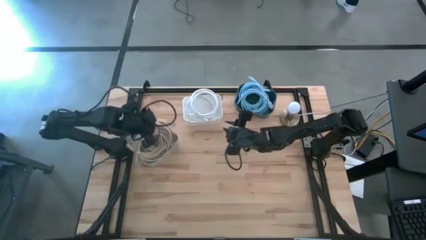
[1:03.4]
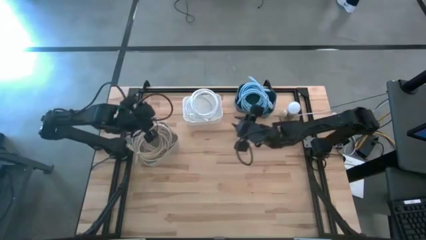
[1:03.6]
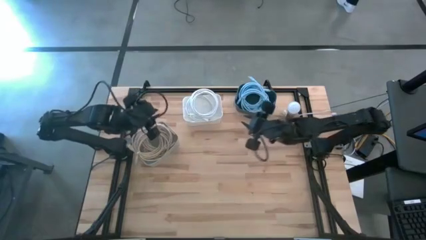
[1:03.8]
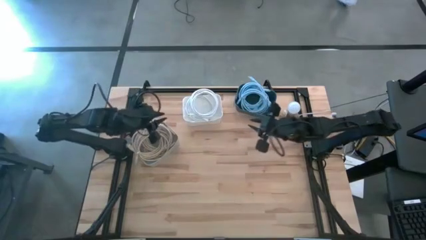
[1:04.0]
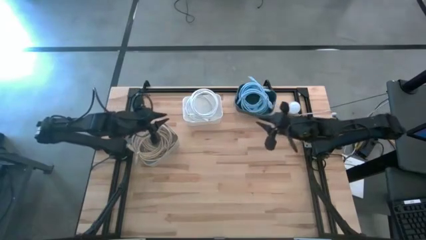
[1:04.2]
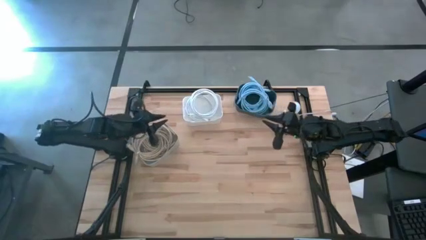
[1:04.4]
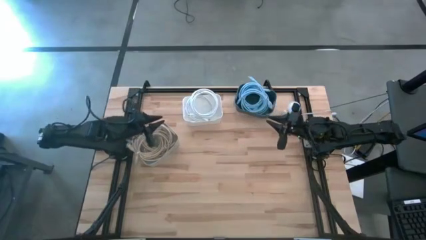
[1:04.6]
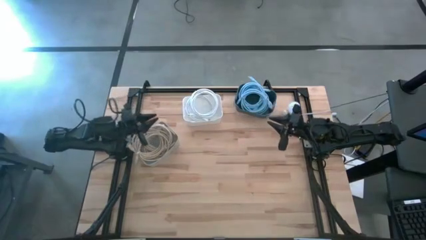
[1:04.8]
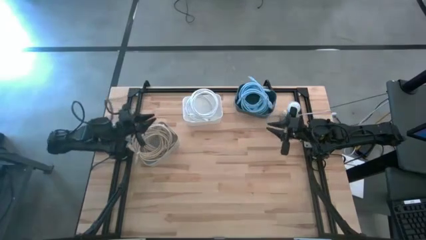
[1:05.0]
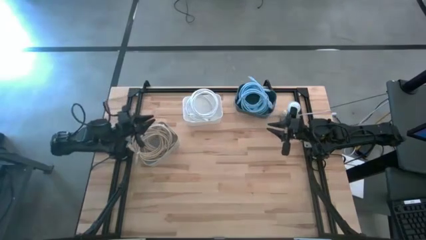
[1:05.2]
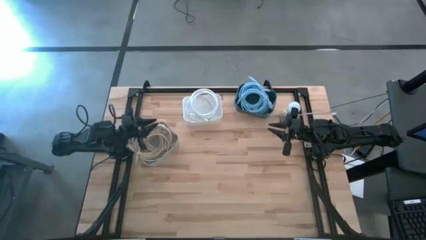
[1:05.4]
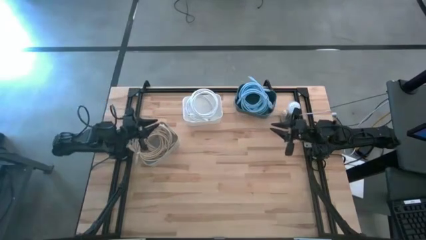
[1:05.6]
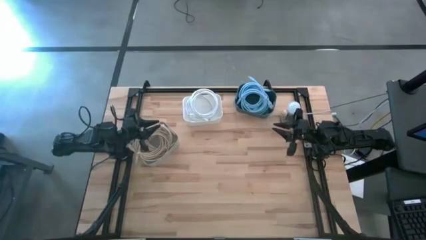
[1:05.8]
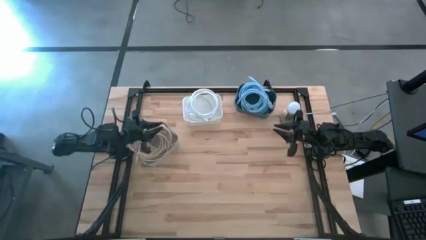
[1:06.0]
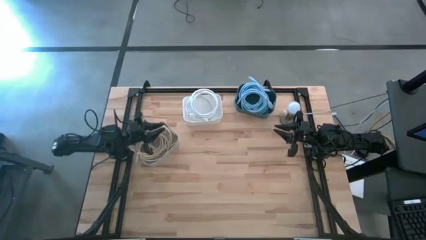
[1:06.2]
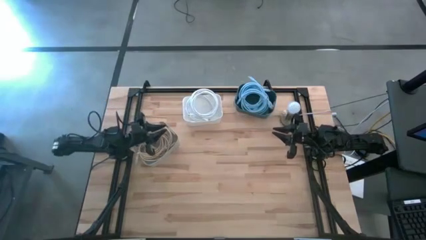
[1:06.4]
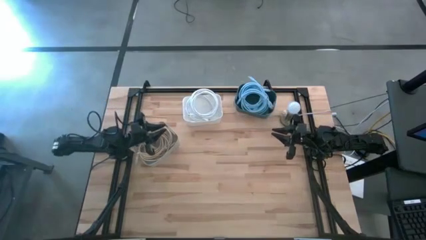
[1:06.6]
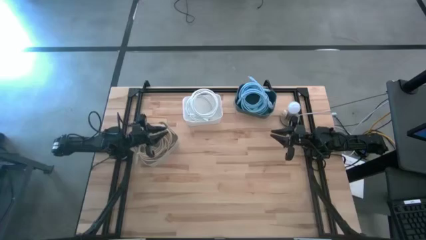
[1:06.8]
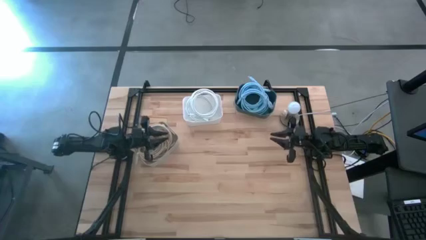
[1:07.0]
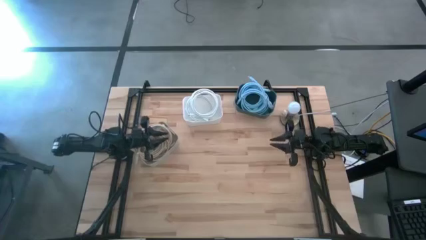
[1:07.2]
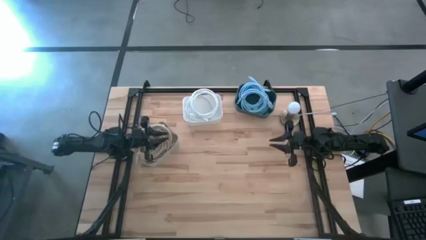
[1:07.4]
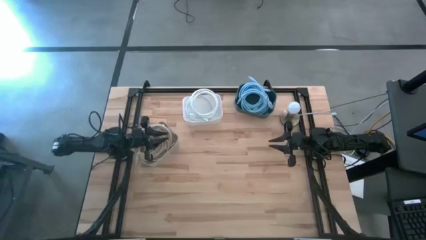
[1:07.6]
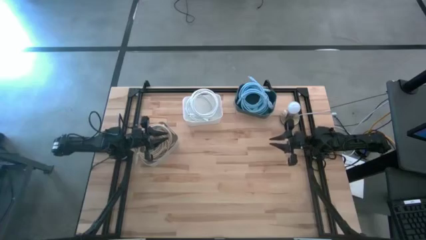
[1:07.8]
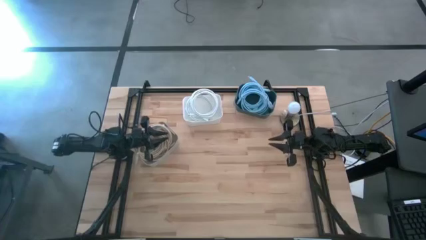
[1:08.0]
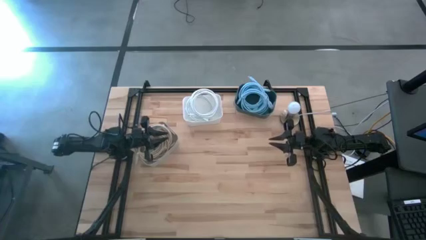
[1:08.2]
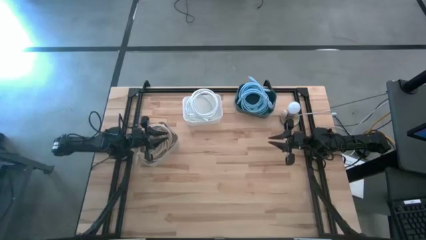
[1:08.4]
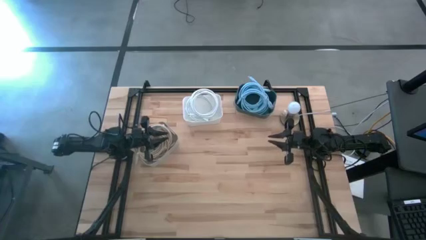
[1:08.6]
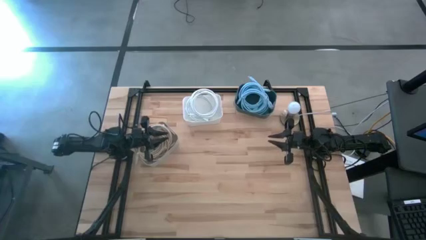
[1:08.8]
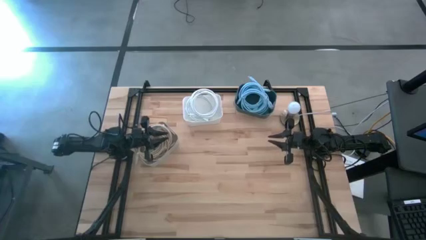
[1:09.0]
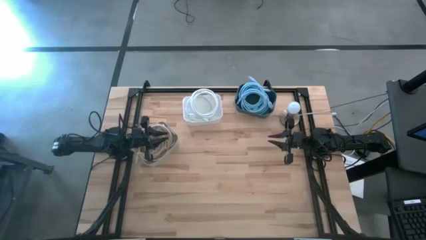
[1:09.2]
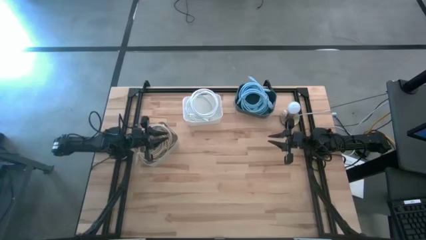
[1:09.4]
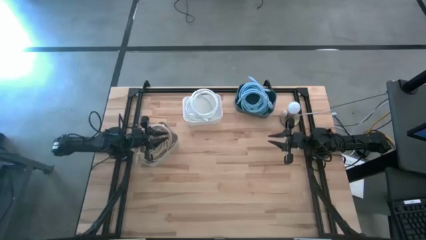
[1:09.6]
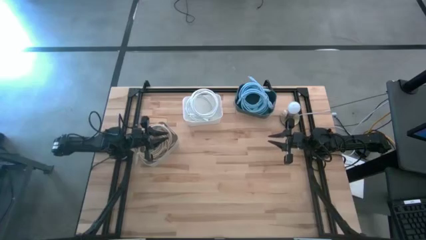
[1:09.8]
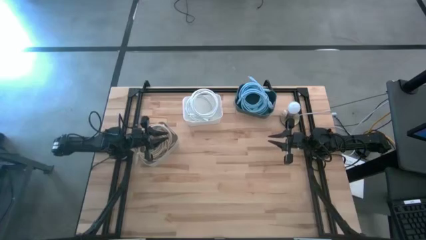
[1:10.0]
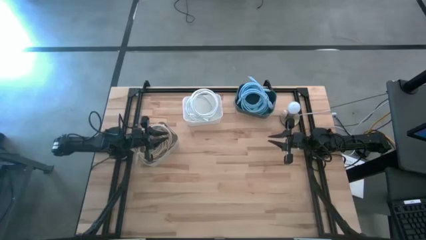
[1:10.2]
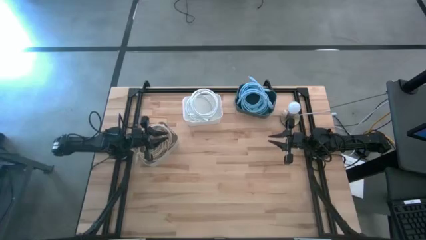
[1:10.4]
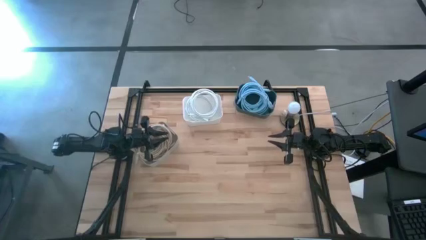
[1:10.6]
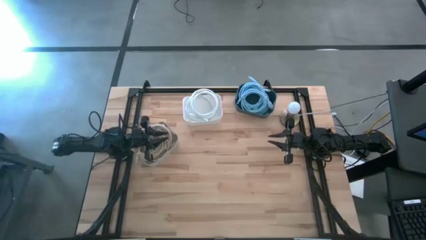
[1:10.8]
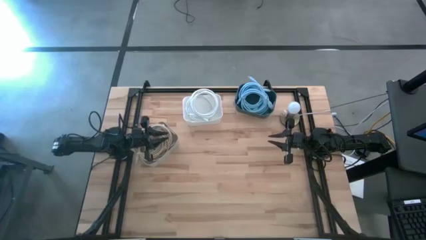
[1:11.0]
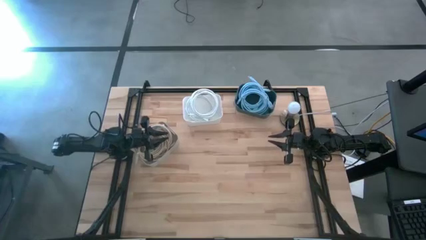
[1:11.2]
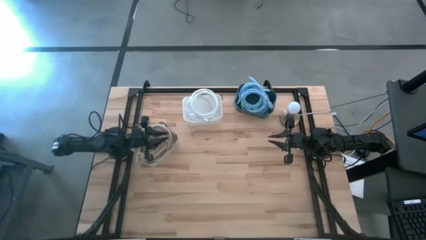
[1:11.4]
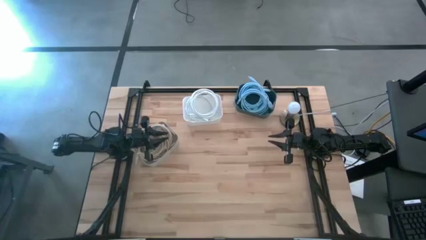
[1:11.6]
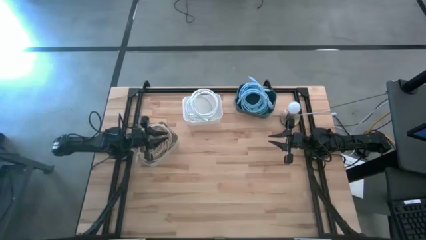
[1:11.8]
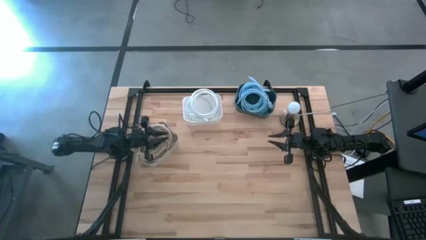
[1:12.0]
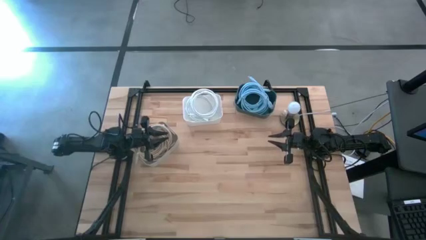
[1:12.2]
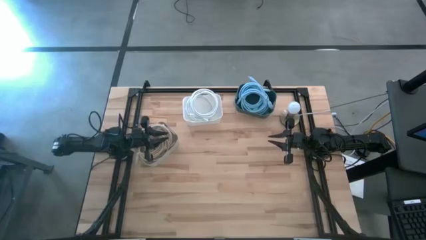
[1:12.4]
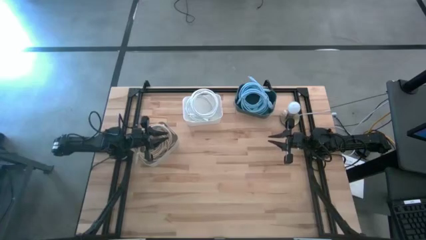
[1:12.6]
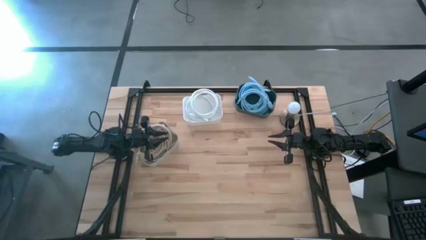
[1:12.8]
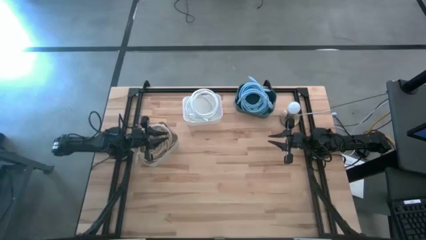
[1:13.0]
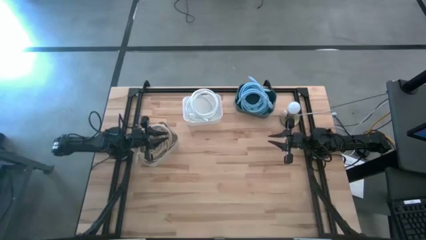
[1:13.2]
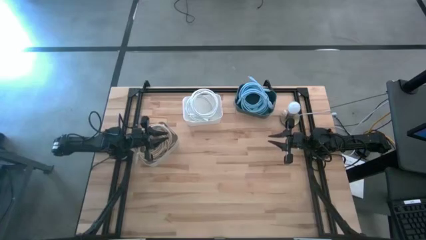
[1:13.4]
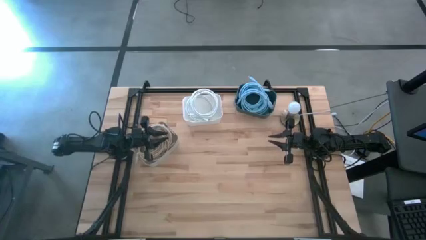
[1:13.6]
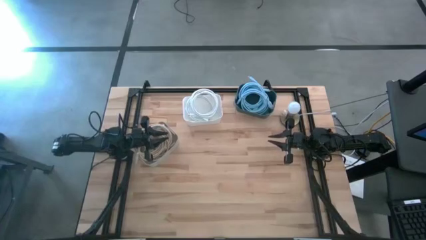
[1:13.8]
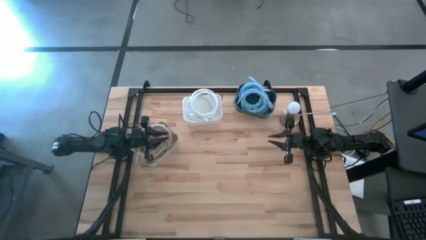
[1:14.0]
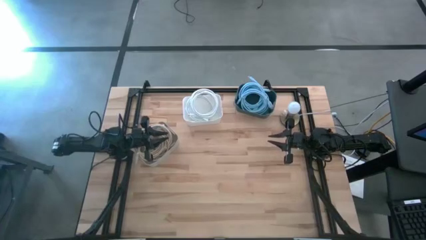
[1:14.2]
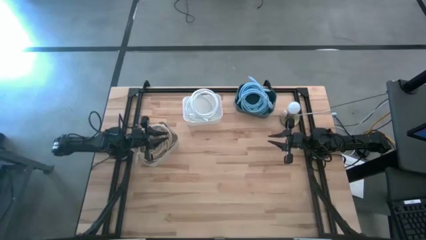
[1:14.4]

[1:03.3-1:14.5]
Task: Pick & Place USB Port
Return to Home Position
